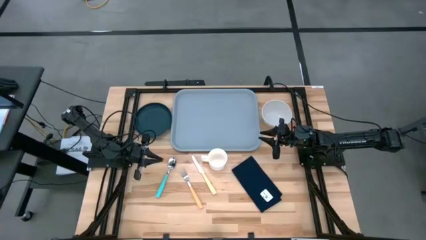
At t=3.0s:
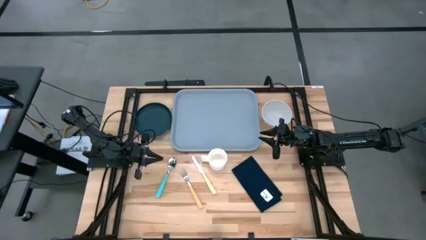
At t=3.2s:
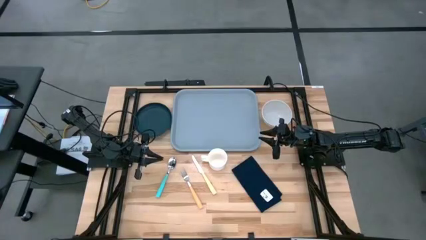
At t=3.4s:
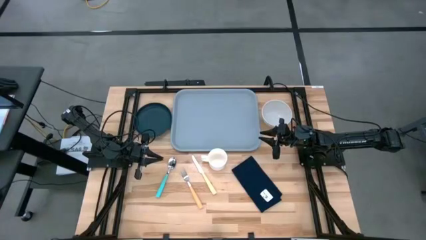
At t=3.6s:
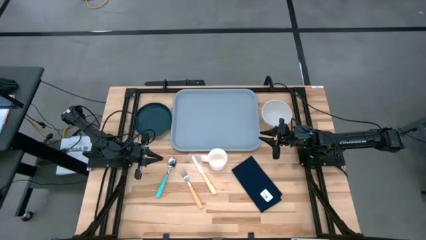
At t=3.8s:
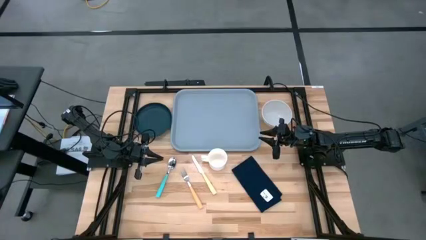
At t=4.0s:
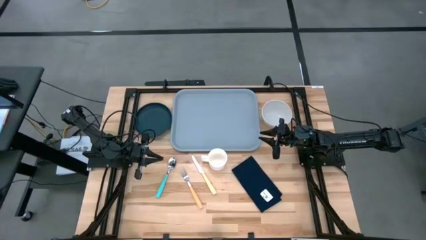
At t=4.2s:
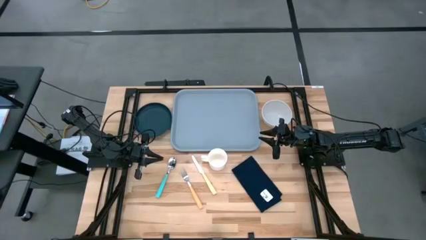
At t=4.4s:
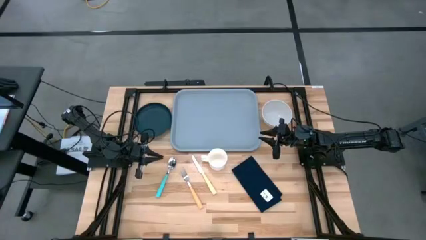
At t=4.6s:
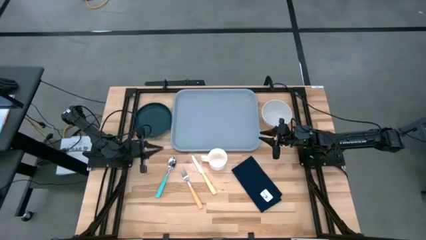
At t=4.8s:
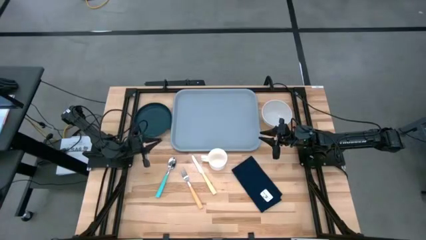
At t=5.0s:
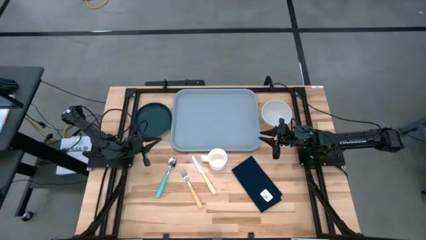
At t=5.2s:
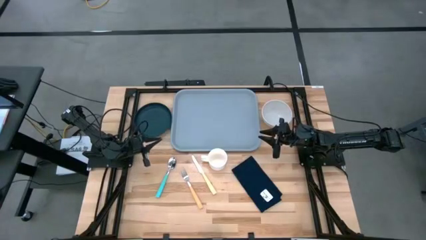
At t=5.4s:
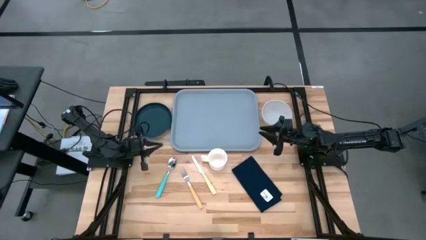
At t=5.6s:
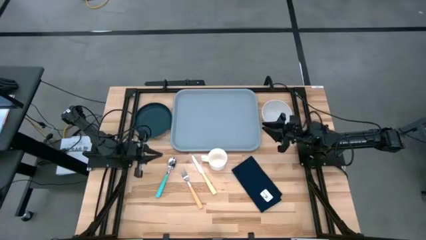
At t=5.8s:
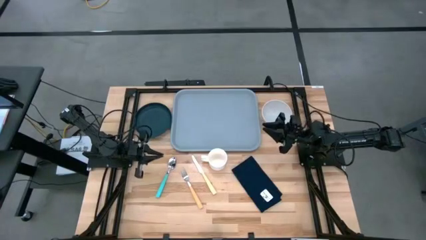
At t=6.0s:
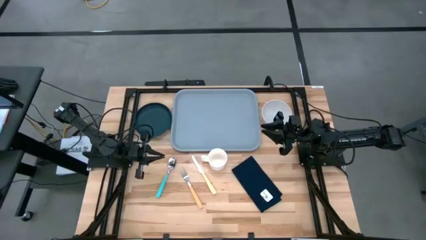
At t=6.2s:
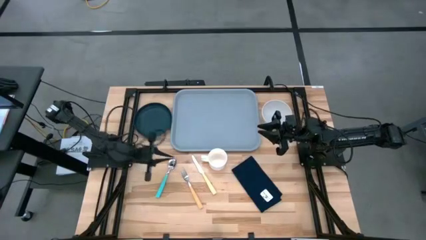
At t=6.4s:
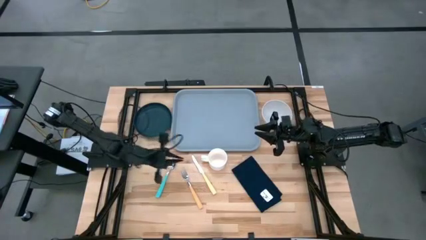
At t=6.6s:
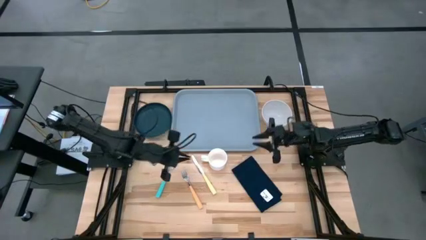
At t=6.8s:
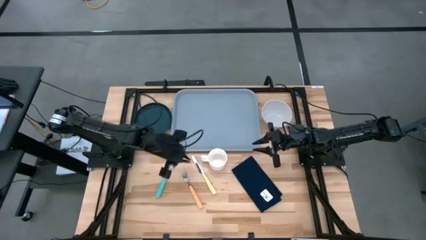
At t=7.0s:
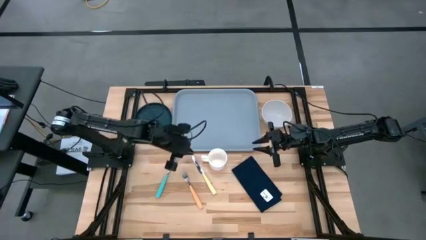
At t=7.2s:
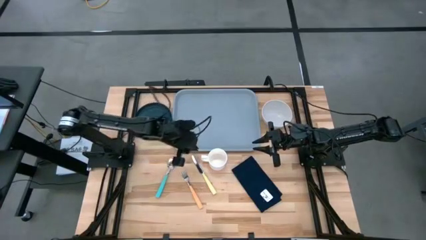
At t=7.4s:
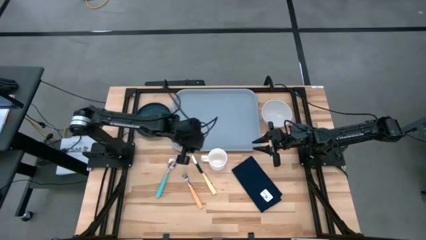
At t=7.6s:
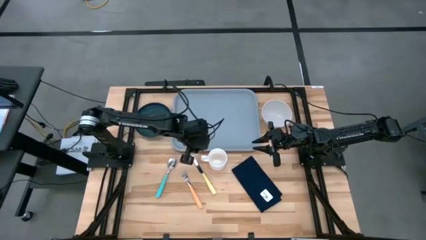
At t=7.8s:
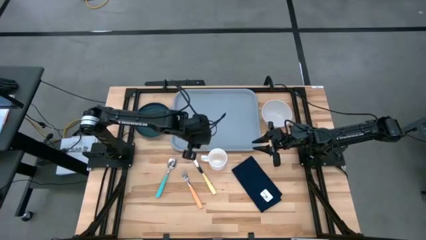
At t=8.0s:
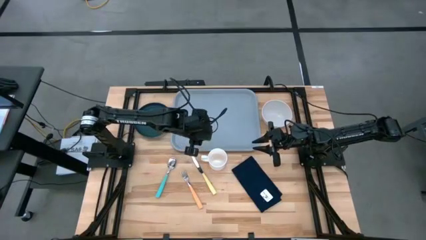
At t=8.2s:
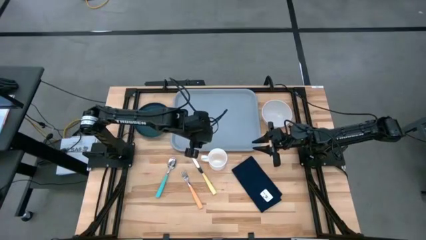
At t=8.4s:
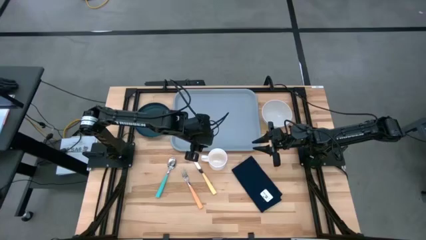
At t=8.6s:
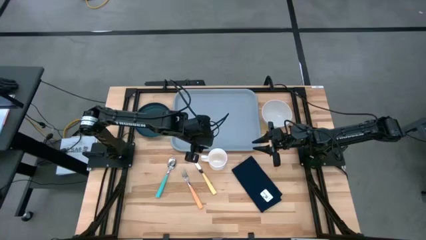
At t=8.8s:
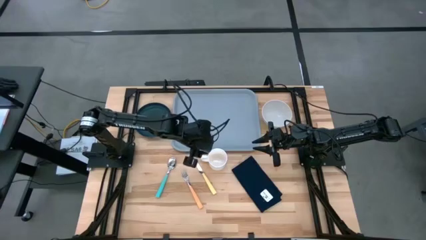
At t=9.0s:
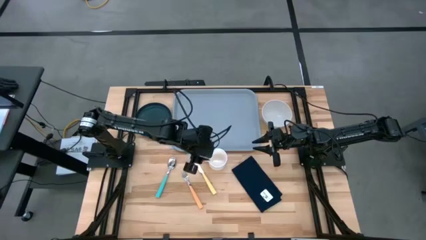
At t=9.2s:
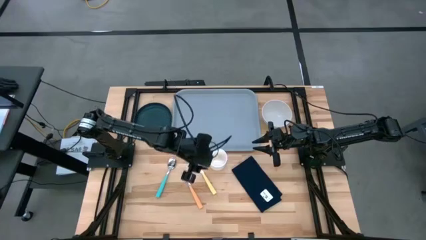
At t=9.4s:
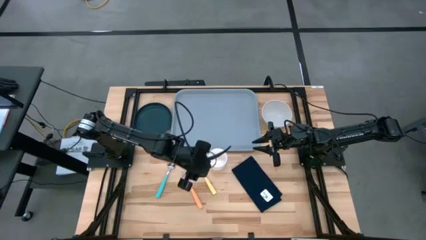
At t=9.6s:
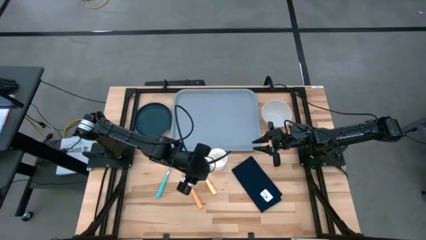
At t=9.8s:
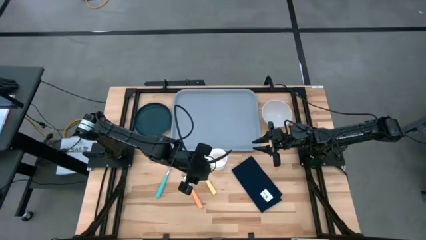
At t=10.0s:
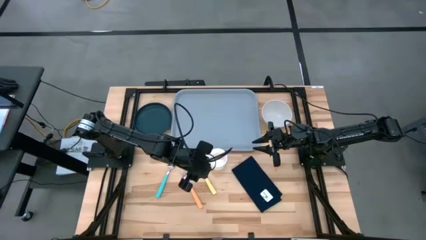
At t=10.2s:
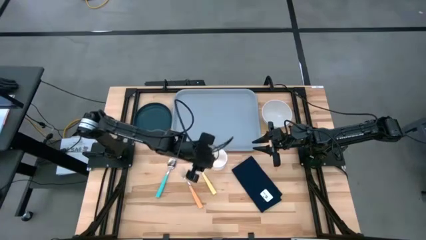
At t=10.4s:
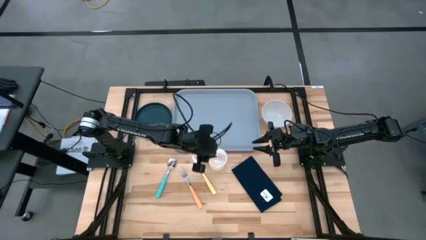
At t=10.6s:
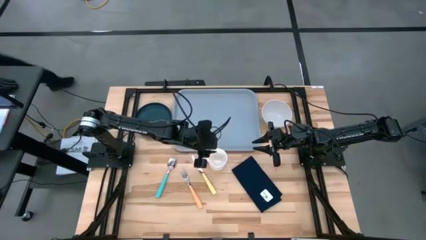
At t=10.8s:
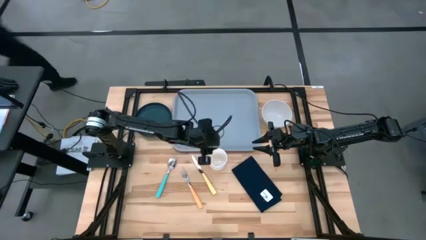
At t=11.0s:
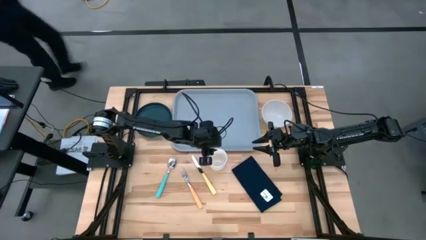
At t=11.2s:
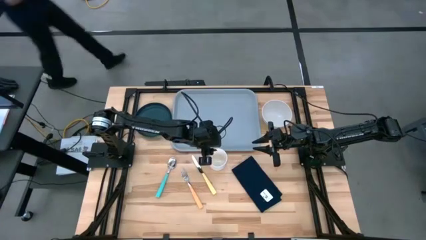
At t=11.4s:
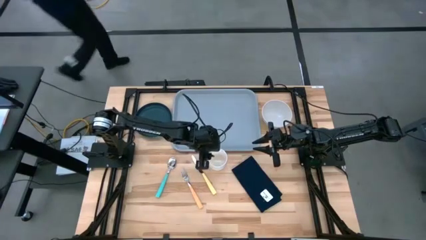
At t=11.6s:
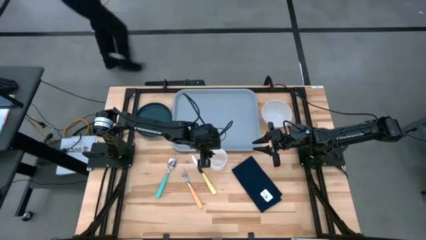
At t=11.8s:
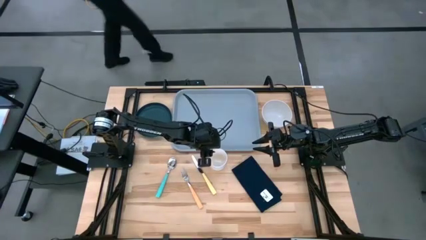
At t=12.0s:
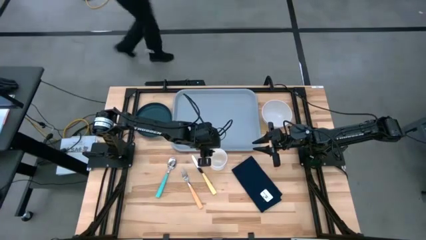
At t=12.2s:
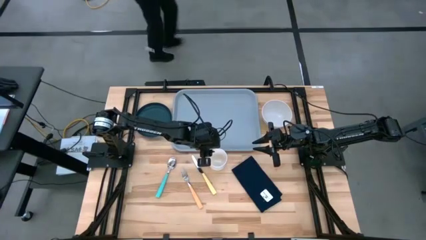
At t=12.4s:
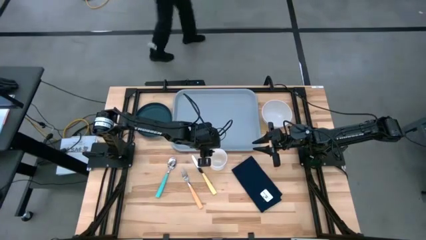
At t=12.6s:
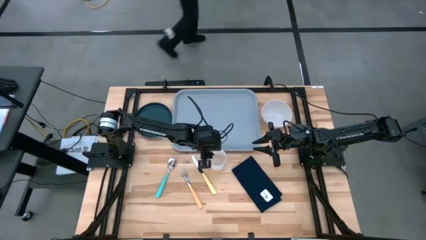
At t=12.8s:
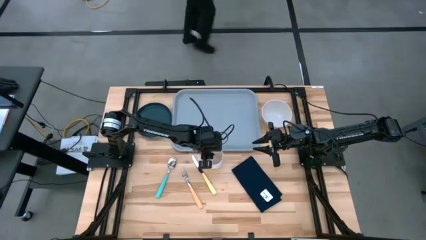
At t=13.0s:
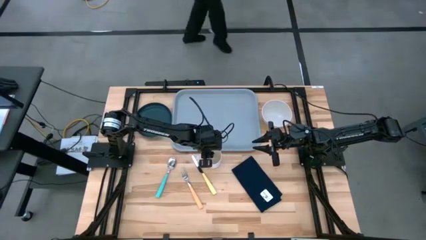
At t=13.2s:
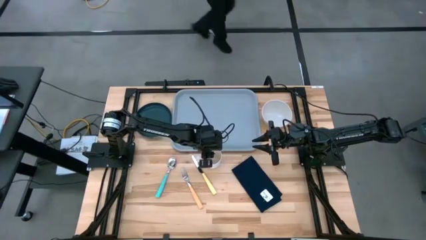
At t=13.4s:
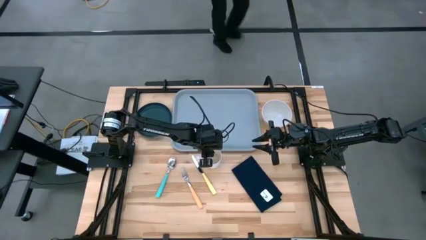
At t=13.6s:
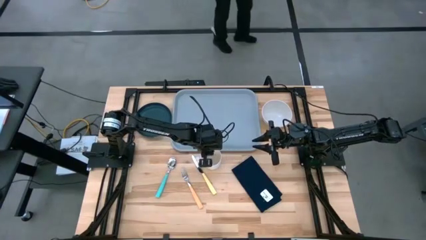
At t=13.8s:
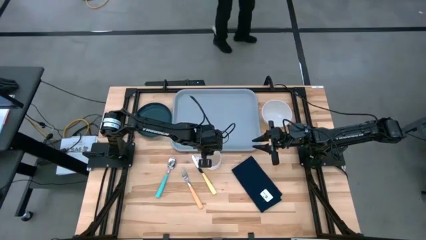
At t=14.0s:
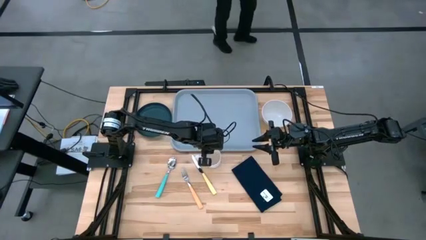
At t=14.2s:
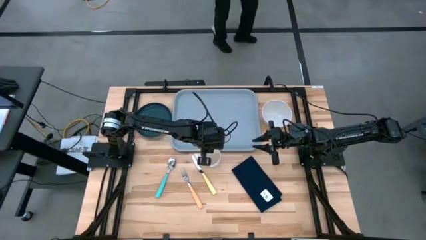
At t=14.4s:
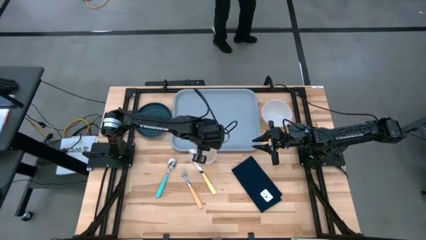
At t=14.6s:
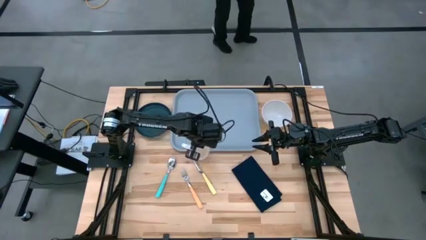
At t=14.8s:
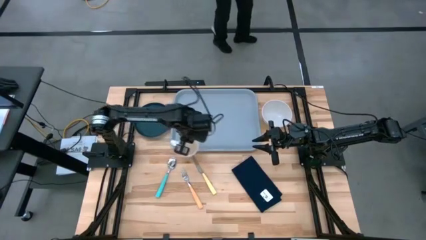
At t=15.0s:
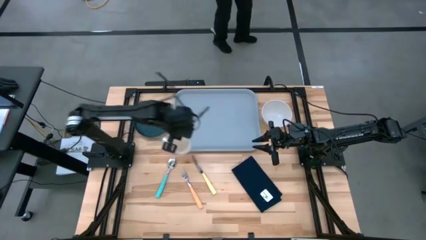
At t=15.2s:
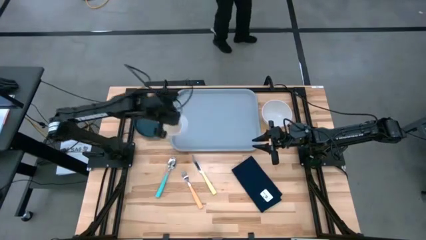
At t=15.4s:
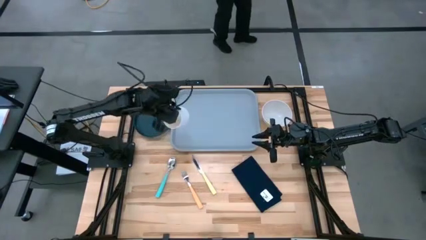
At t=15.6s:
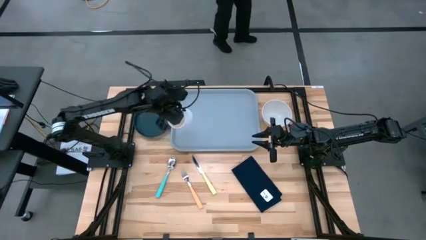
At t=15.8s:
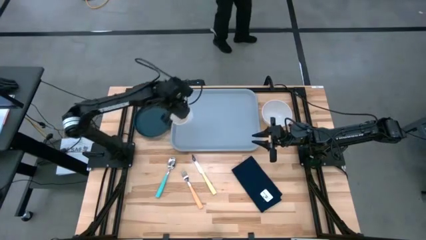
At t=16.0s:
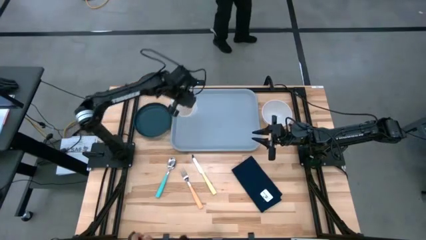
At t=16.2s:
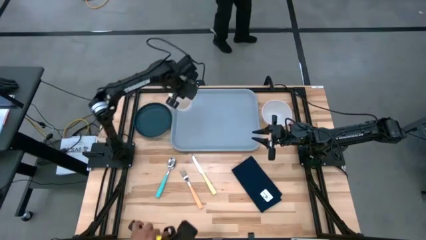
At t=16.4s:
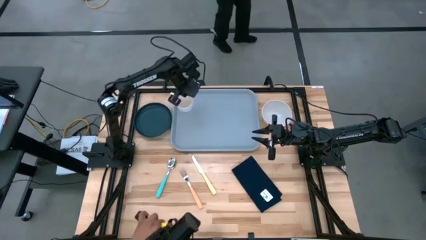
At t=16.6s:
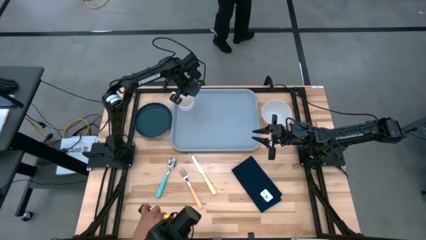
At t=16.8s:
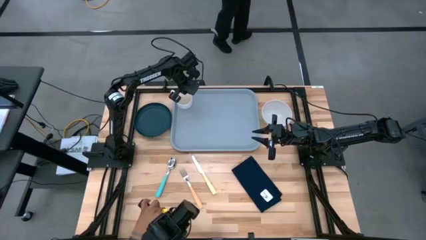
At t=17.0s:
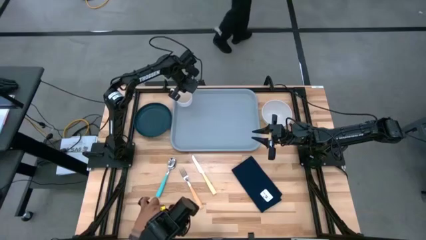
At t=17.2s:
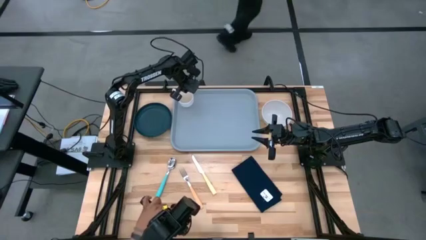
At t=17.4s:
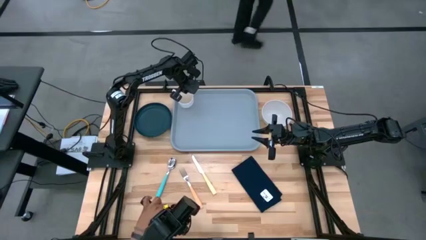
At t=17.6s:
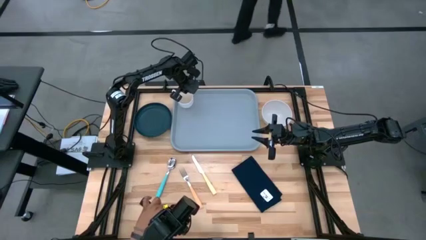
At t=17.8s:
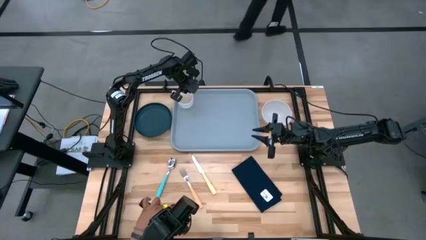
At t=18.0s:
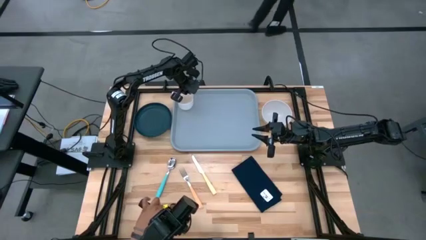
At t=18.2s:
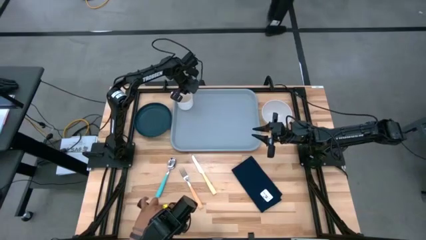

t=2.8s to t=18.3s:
Task: Set up tray
Put the white mug at the top left of the gray serving tray
